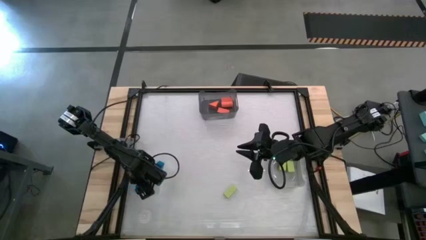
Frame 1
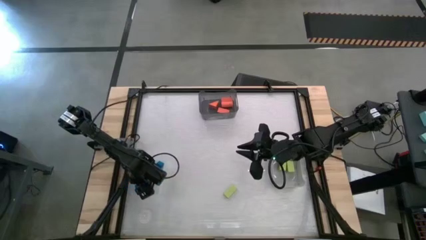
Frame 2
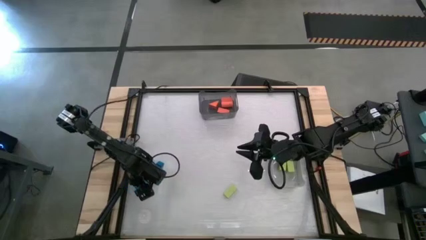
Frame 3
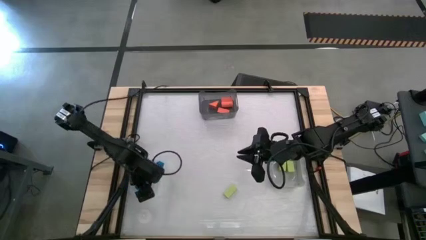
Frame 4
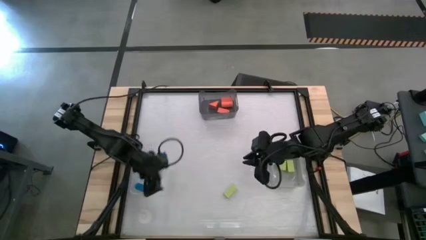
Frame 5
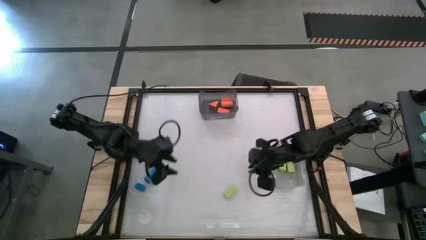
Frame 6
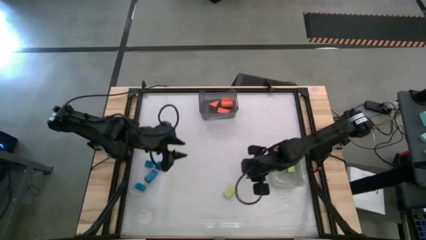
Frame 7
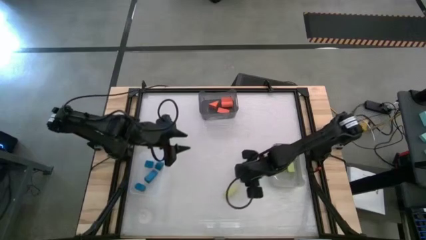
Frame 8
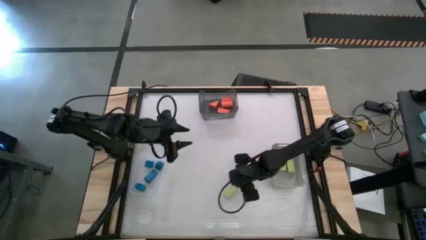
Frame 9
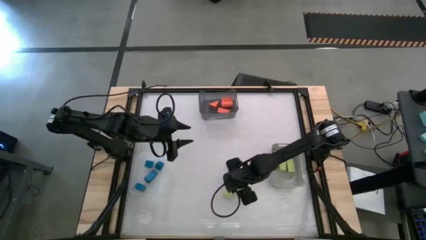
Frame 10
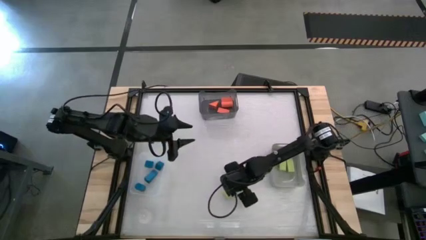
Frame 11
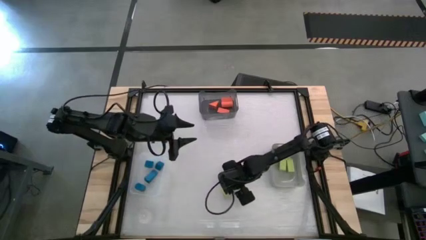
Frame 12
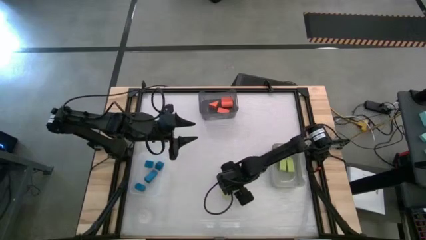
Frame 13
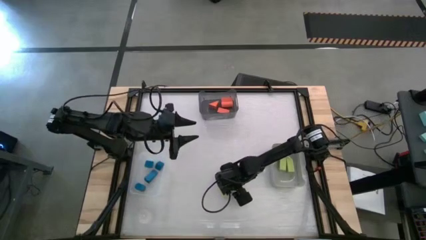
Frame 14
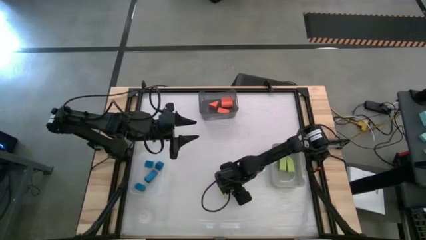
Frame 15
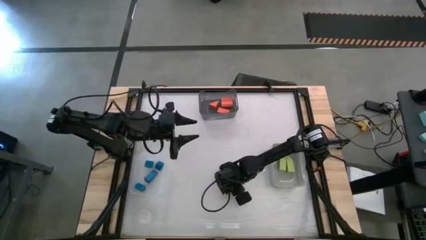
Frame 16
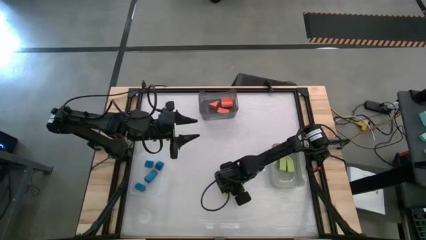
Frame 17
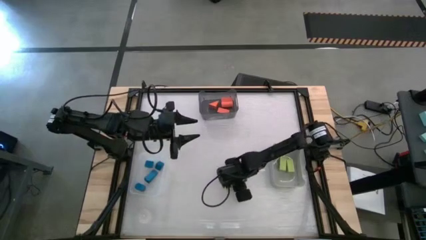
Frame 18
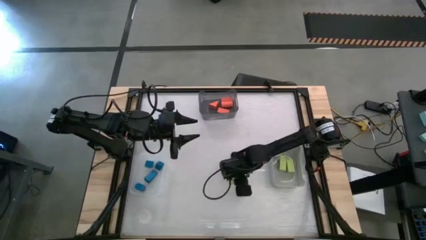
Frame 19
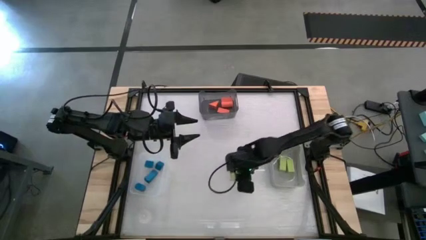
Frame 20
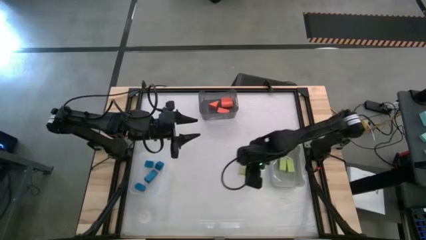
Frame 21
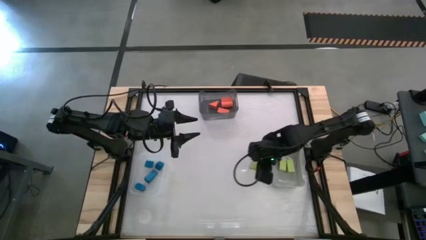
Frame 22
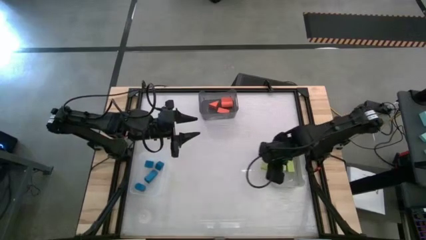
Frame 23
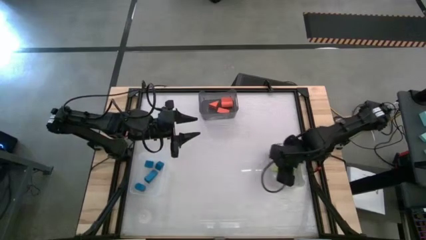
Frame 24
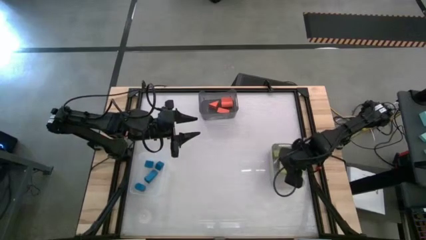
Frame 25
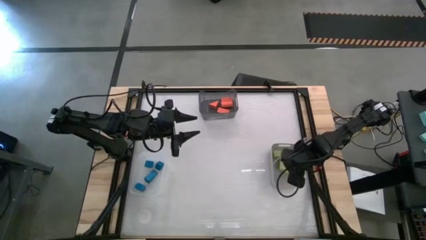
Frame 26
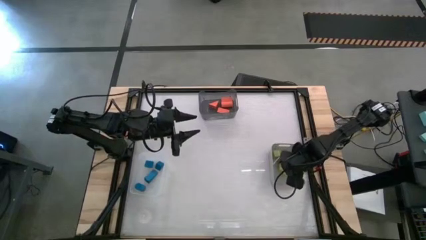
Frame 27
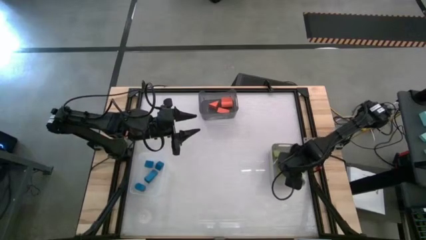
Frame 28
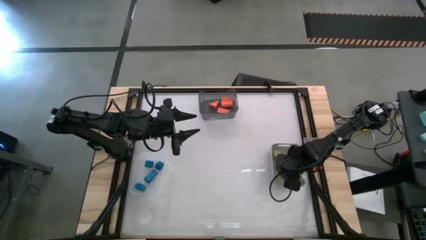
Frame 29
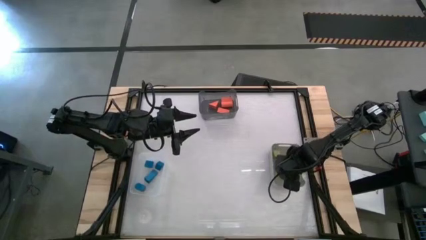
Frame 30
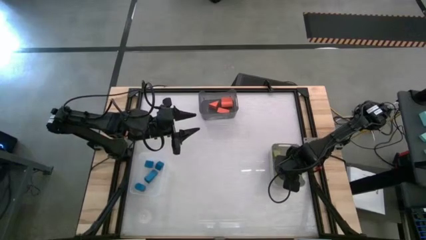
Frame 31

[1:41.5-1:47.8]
Task: Sort & place blocks by color
Put the green block into the gray bin

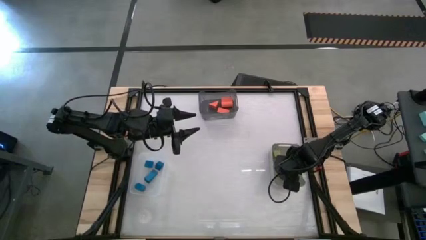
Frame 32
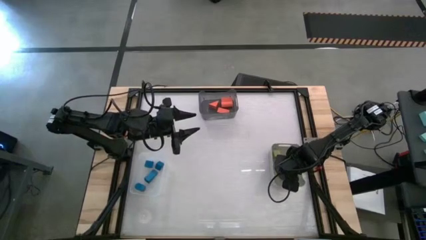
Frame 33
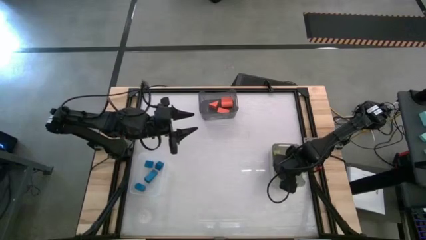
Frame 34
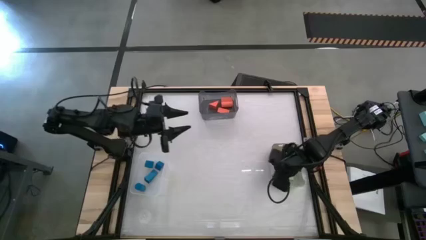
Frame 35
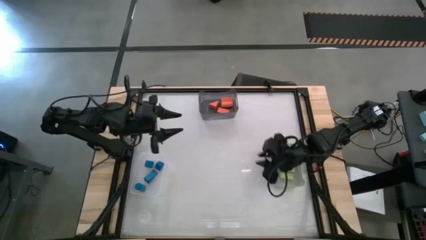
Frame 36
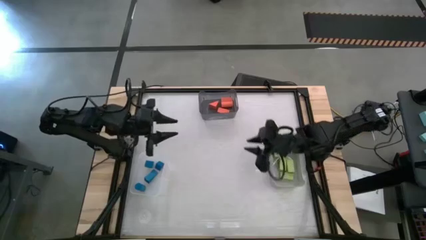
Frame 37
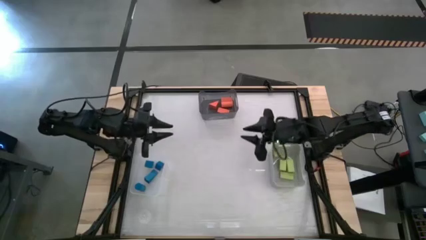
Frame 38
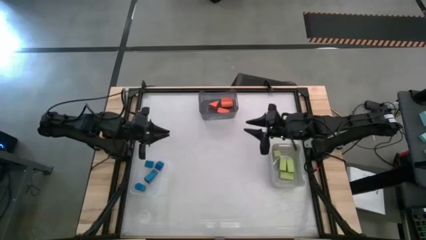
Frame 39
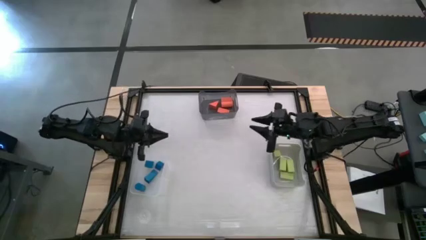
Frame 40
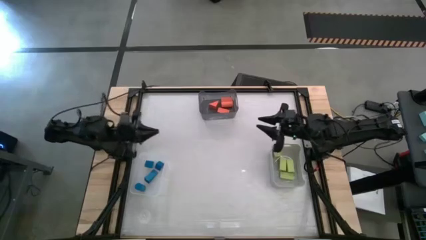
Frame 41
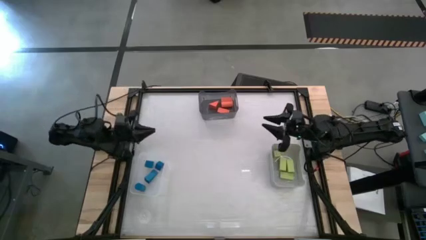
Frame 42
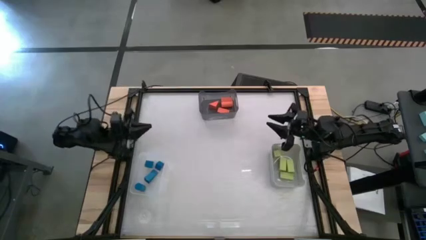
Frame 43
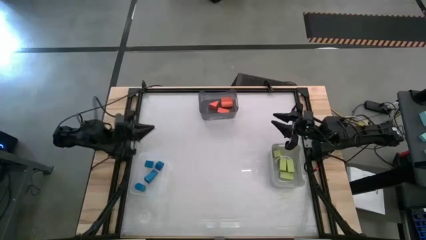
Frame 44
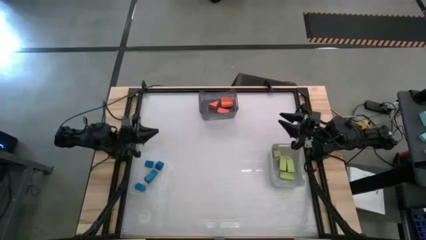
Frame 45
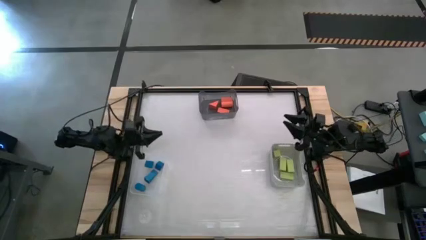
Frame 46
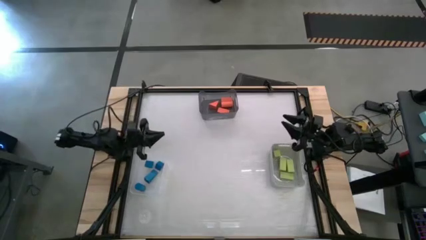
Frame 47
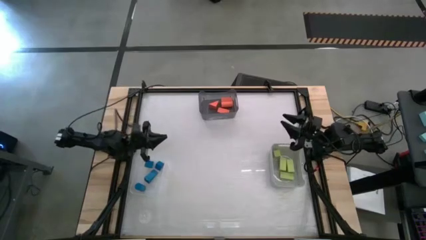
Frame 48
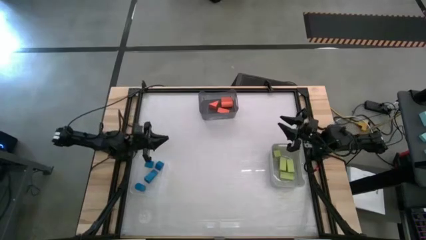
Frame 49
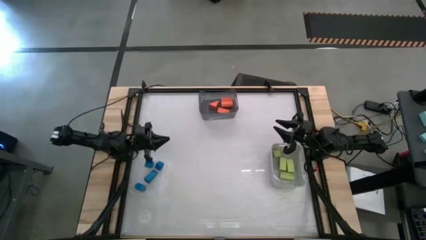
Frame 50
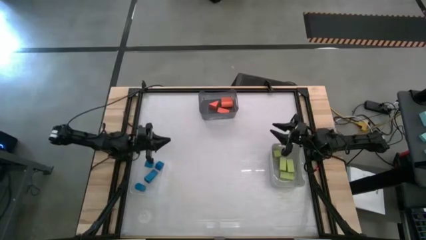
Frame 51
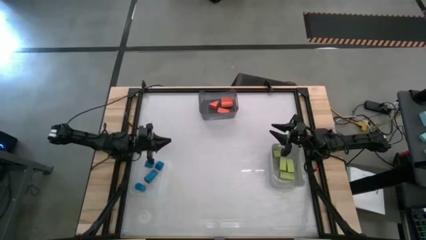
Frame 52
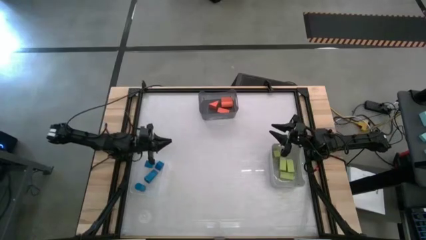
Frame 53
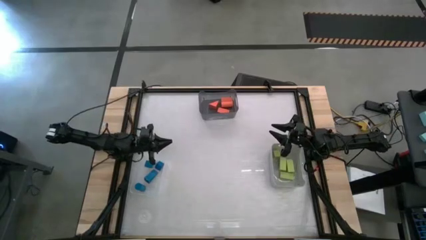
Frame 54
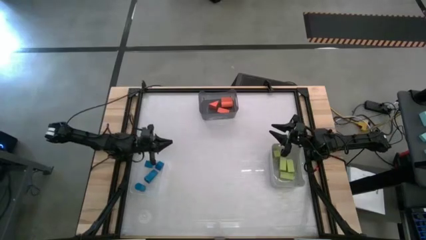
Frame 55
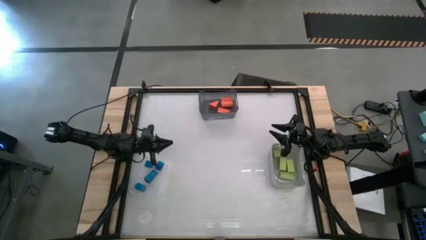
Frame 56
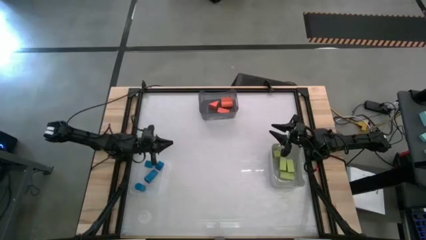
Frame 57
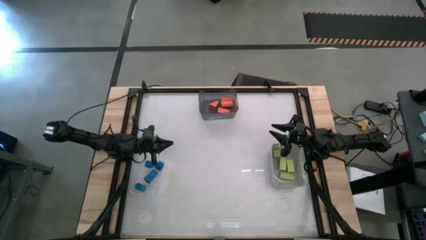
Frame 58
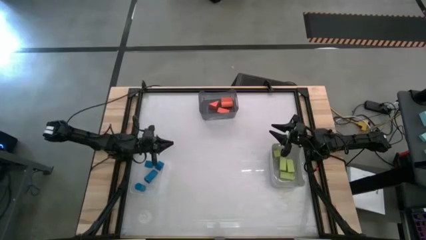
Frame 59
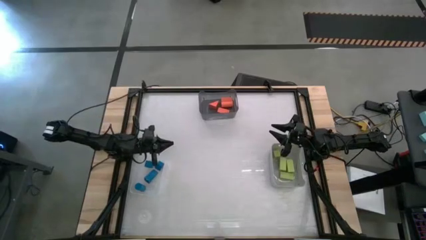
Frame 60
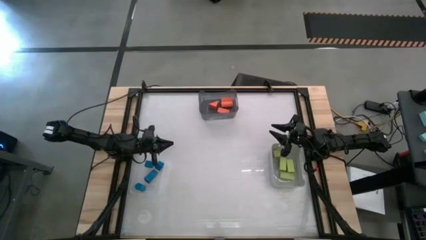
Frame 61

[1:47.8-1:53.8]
Return to Home Position
